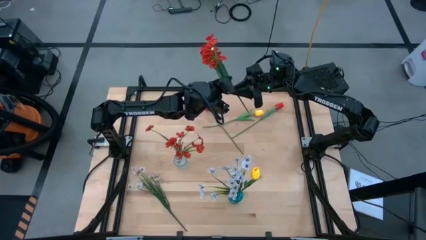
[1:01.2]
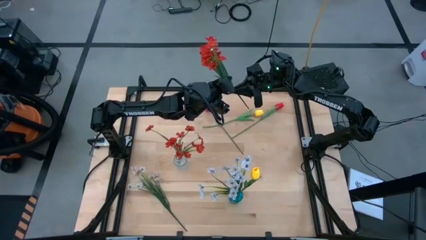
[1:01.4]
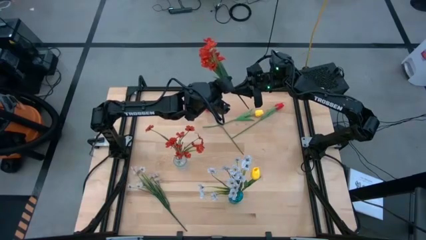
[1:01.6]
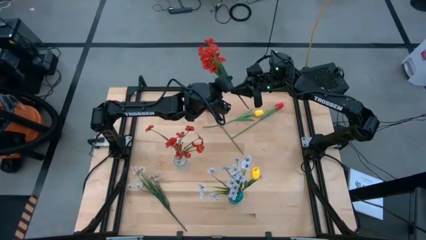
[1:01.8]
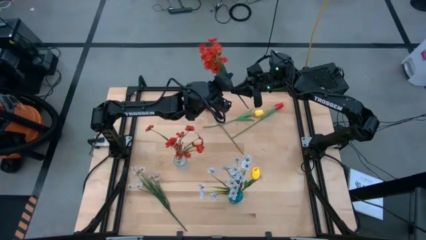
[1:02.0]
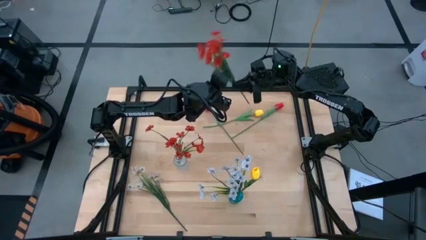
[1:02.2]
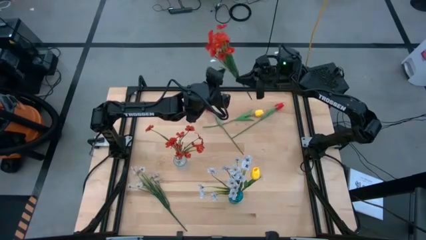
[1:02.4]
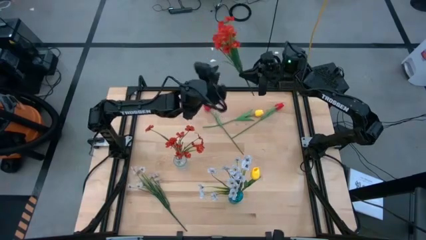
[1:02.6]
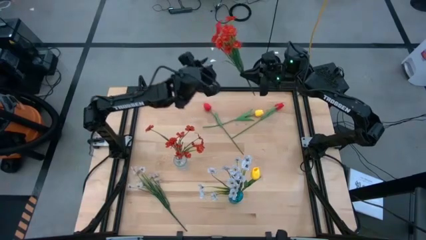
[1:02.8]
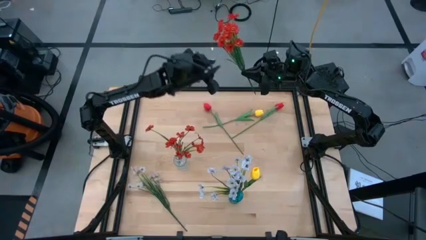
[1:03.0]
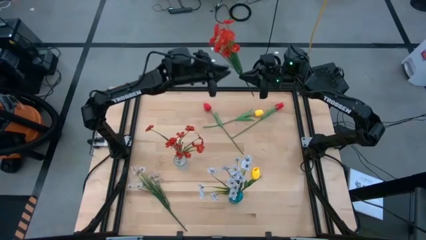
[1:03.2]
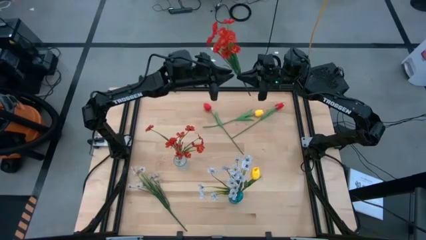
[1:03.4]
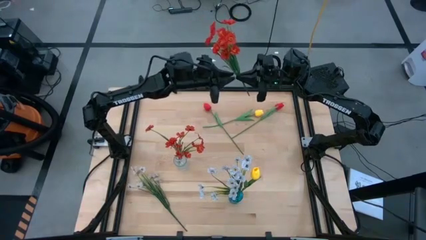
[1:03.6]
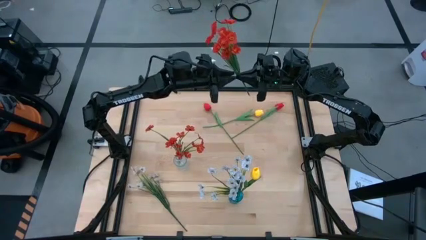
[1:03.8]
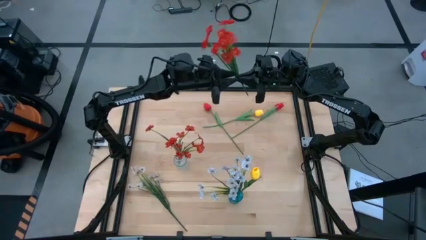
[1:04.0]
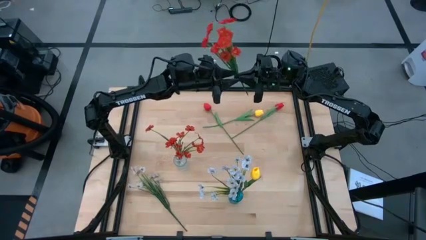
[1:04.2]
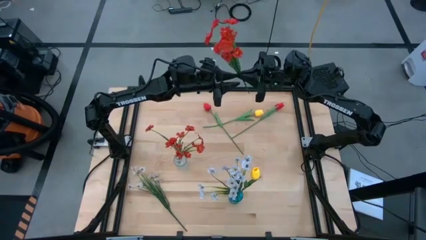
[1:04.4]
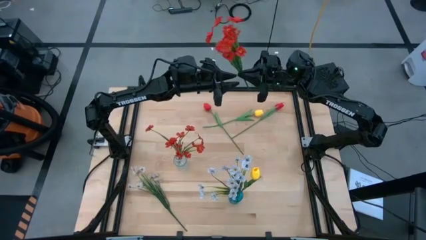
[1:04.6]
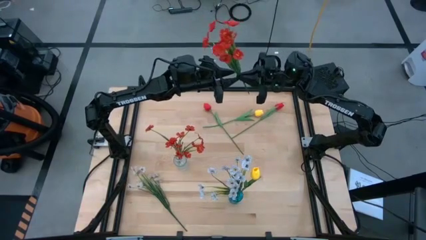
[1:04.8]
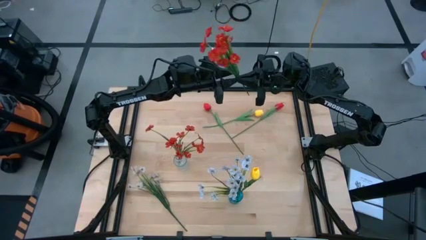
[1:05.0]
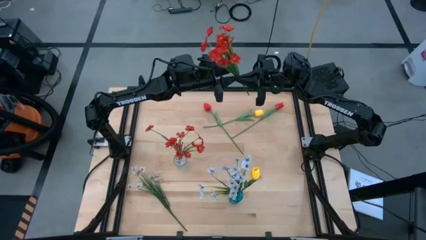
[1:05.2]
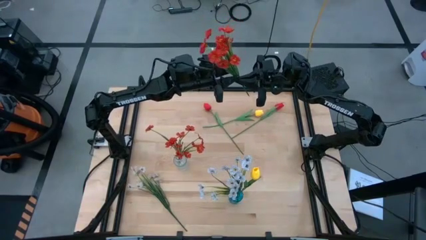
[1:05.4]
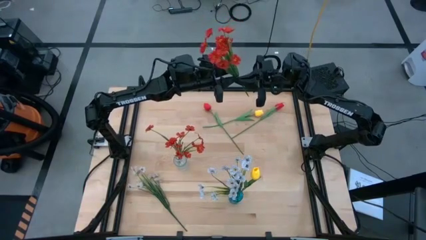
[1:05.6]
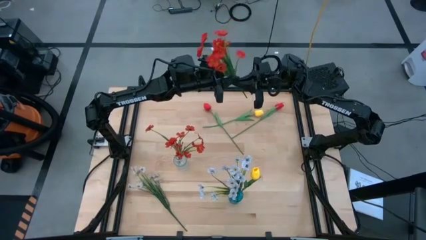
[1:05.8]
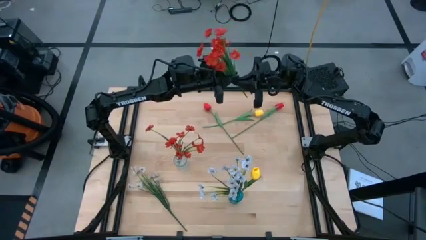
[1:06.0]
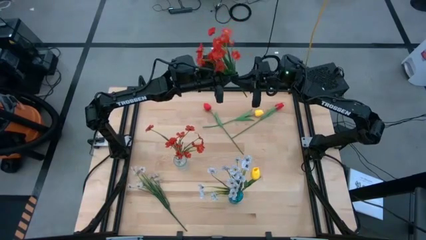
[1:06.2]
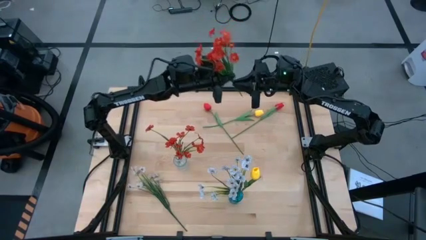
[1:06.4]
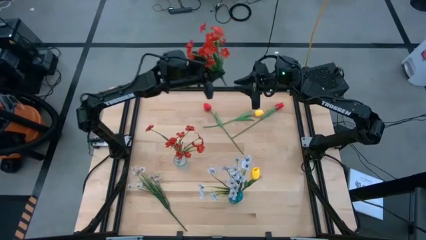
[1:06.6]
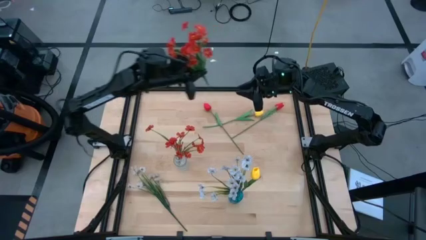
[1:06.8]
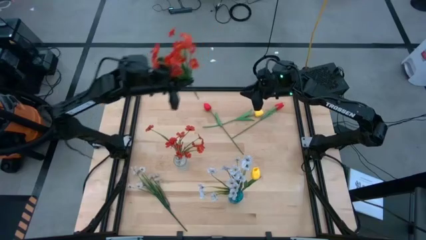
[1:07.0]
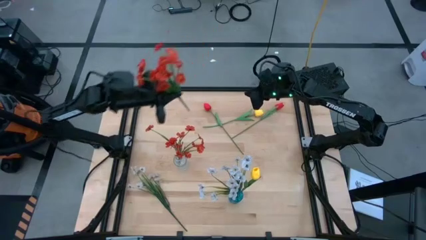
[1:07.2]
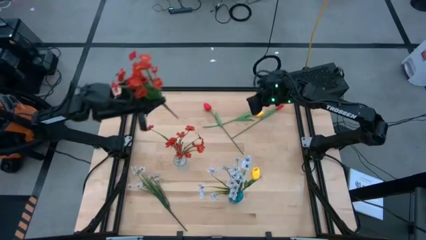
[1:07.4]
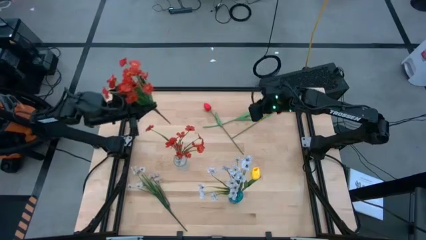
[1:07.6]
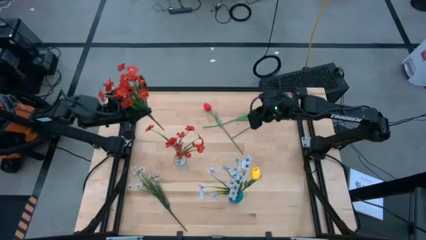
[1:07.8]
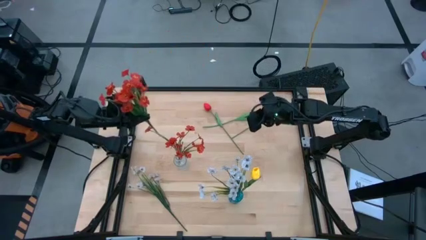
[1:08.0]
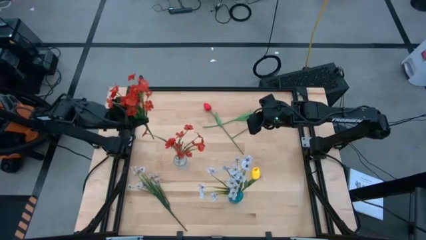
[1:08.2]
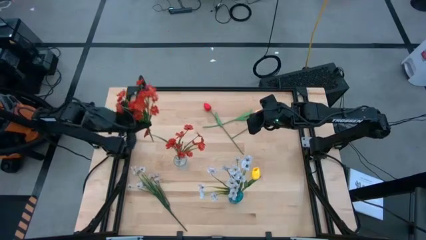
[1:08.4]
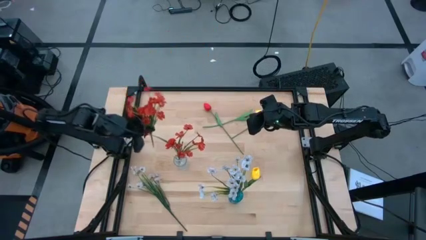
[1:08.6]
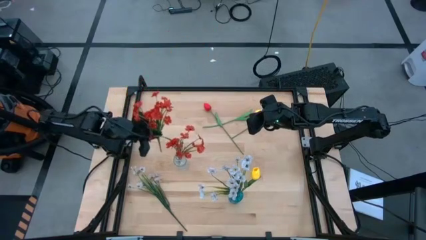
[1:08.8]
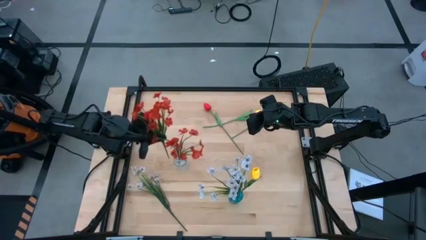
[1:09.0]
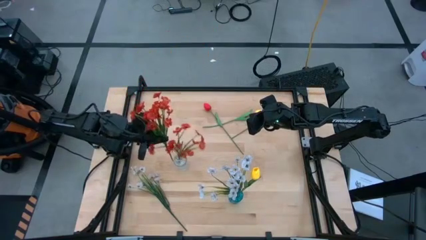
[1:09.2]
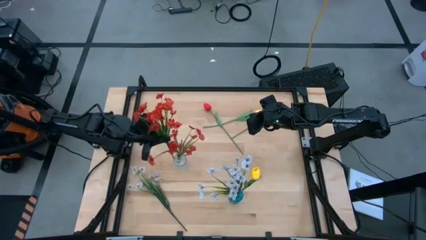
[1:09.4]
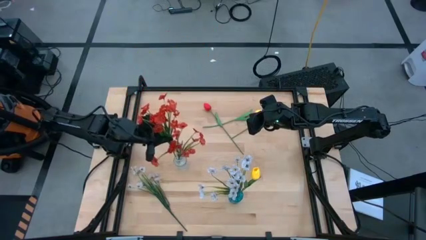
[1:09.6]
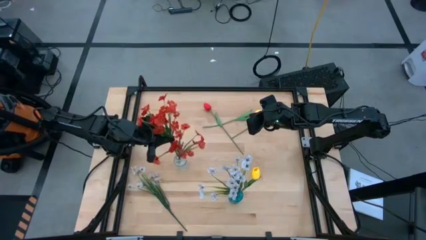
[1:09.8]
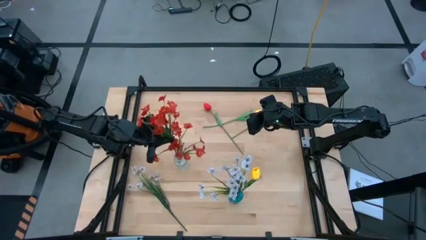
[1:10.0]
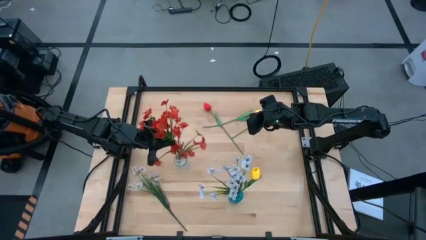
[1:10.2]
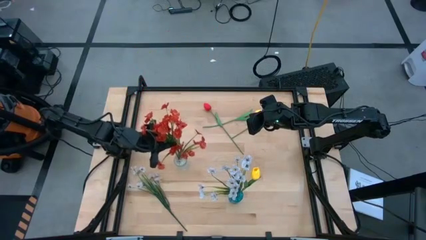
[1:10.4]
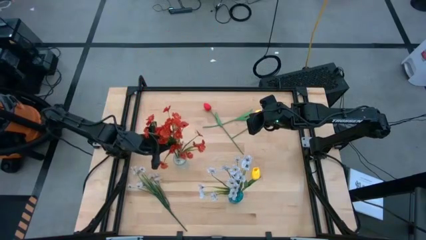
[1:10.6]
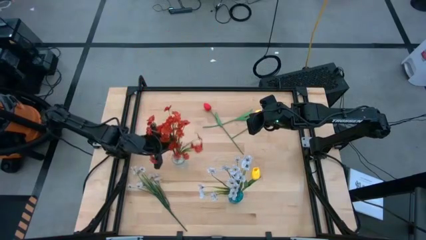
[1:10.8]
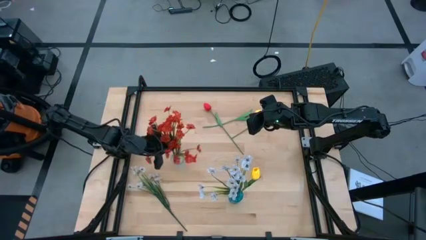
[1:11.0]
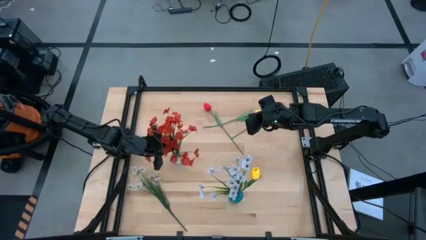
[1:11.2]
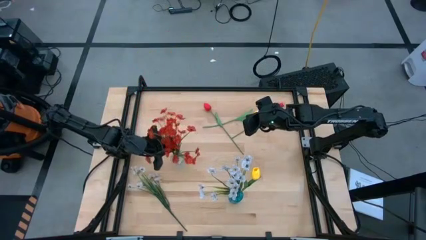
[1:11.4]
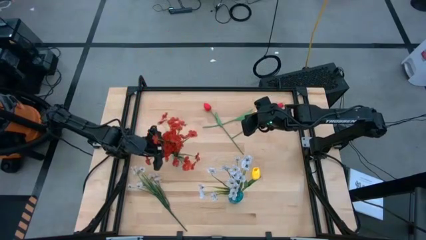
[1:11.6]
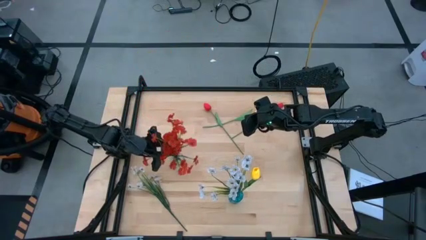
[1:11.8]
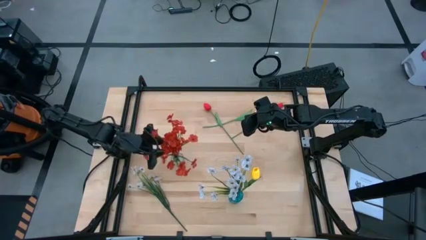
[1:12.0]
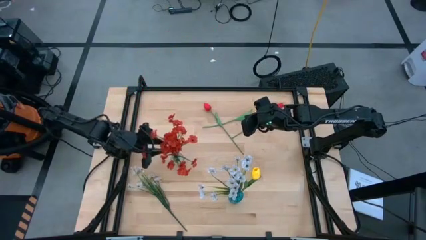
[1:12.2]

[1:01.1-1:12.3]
Task: Sort flowers into vase by color
Put the orange flowers into the transparent vase

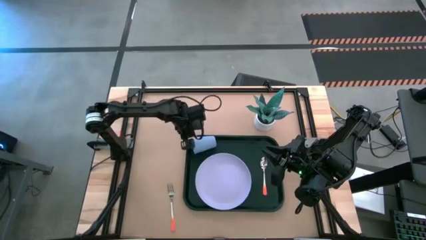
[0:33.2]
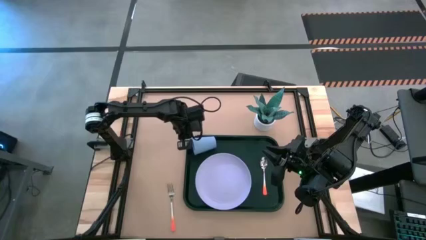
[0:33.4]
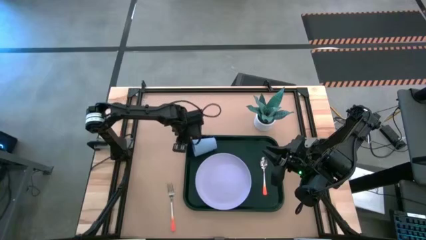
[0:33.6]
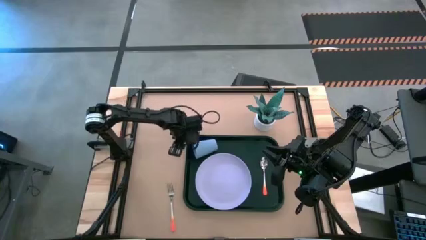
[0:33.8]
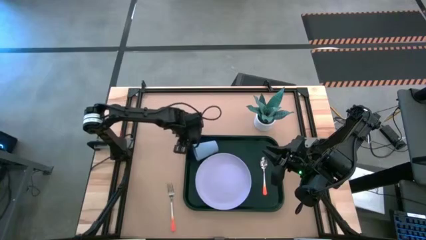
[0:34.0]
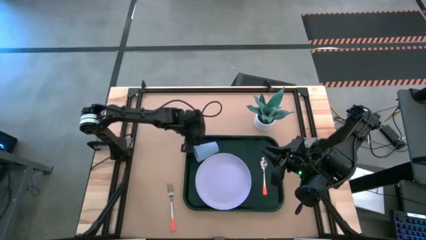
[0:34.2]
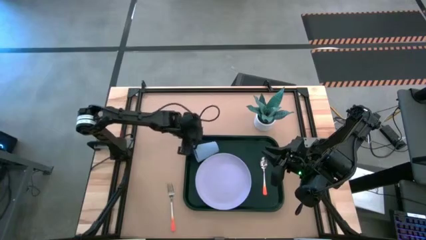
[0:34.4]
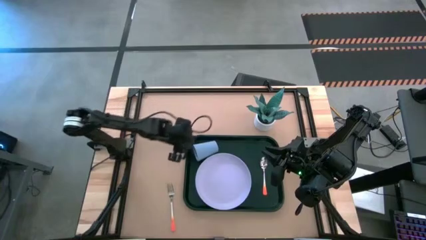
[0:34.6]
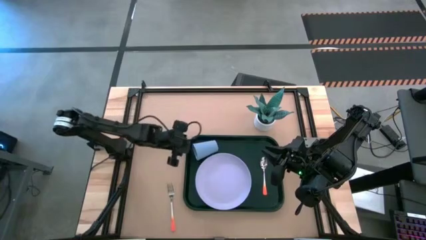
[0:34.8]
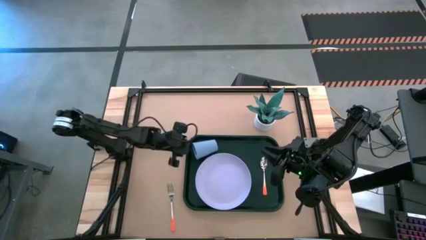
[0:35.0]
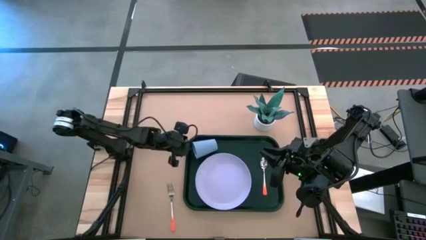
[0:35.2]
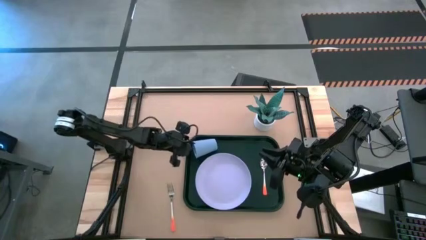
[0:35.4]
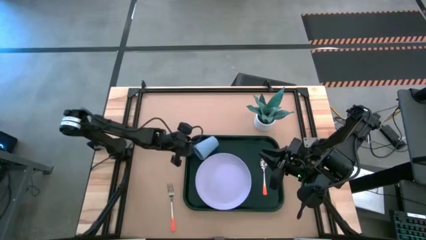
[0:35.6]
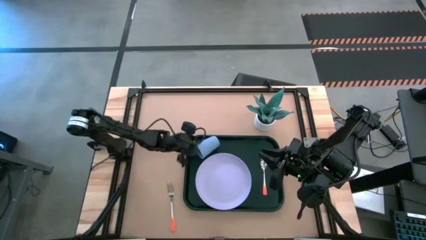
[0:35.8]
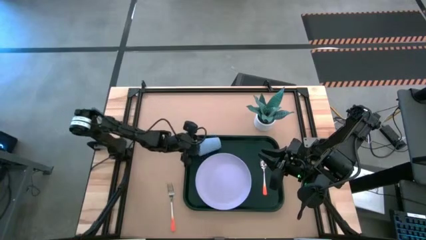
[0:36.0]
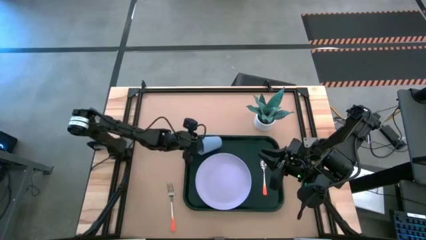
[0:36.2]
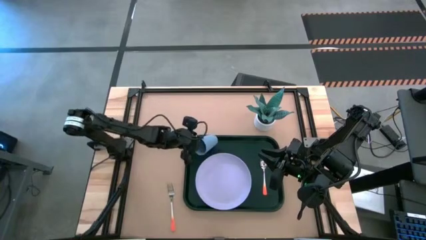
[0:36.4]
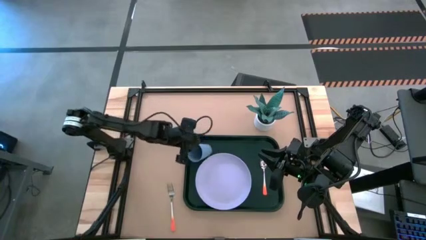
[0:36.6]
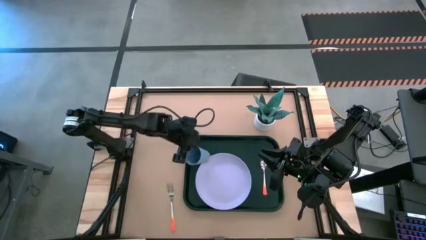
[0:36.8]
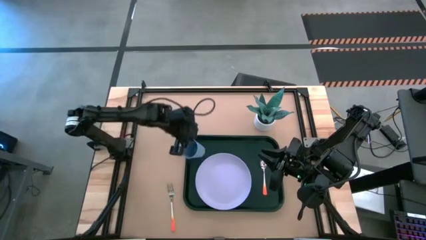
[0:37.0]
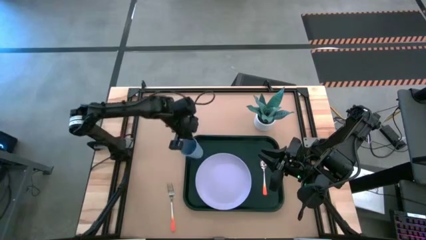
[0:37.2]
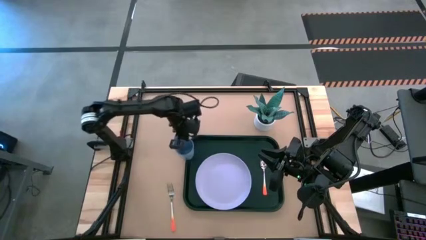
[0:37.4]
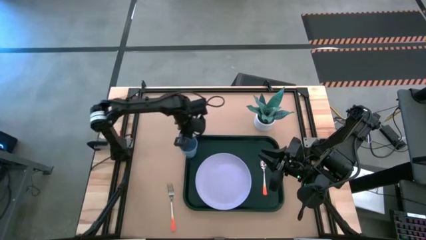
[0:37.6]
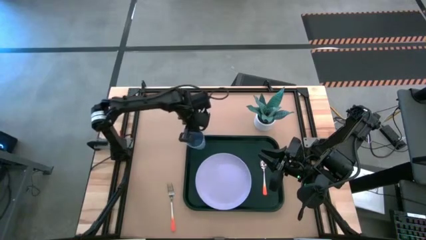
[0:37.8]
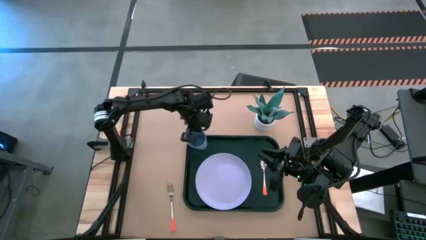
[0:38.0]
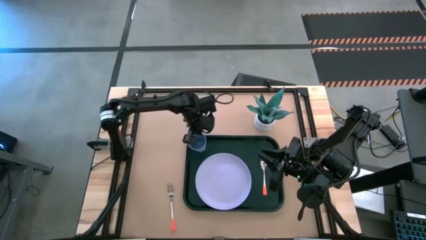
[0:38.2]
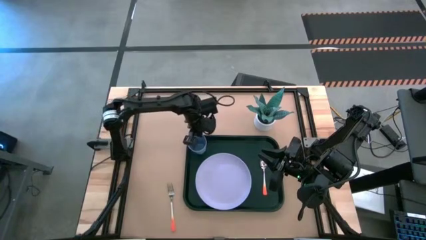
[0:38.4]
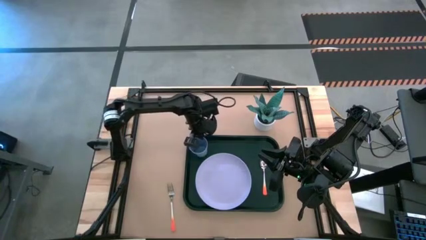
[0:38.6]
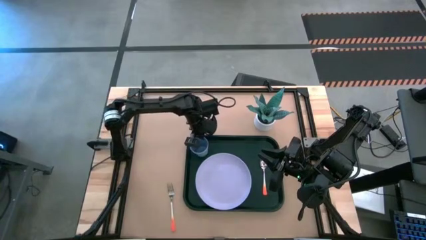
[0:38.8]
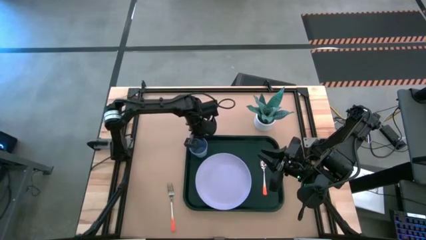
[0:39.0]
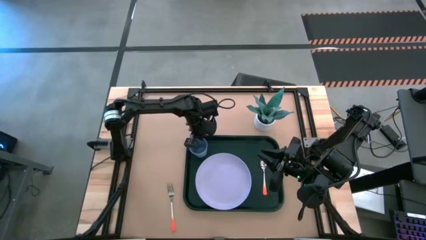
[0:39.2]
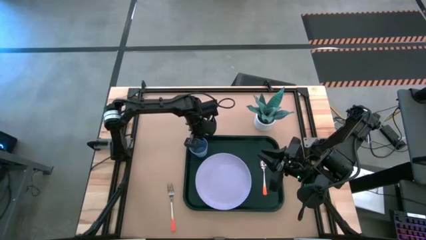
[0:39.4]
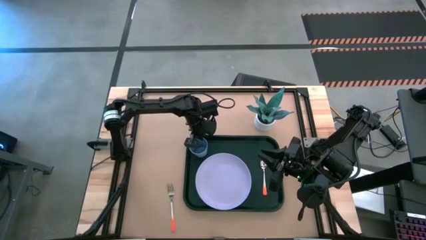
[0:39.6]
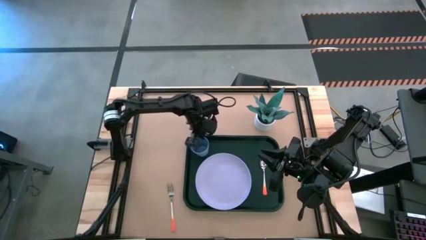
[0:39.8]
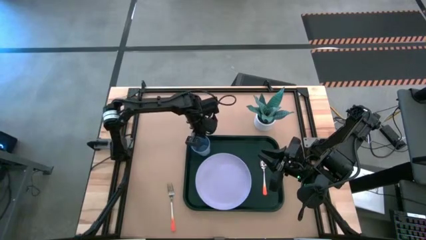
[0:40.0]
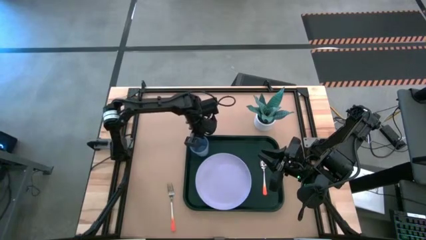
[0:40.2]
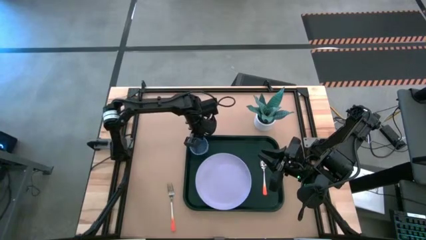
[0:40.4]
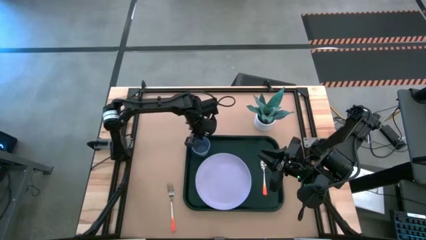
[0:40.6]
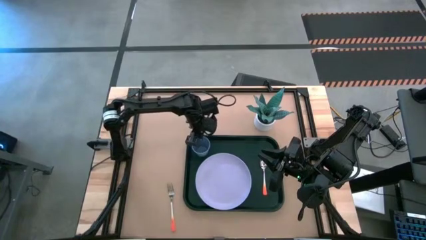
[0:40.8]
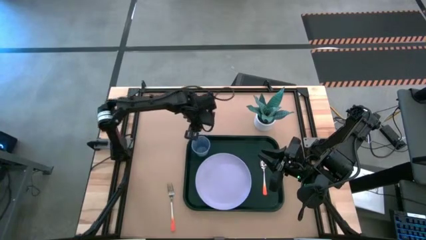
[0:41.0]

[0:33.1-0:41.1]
Task: Pick and place plate/cup/fork/spoon on tray
Adjust the blue cup on the dark green serving tray
